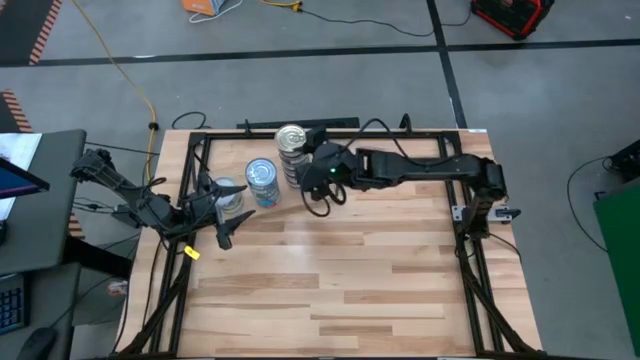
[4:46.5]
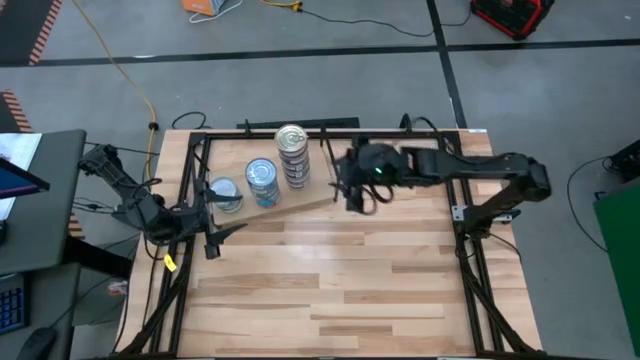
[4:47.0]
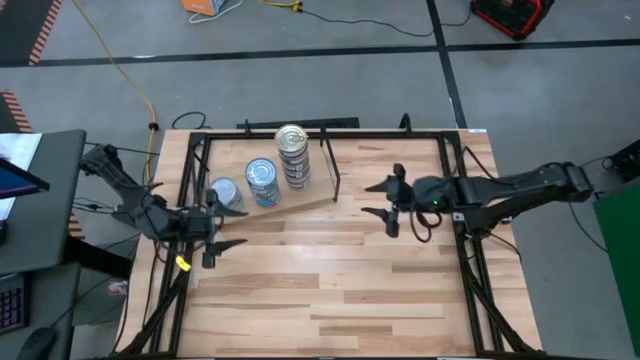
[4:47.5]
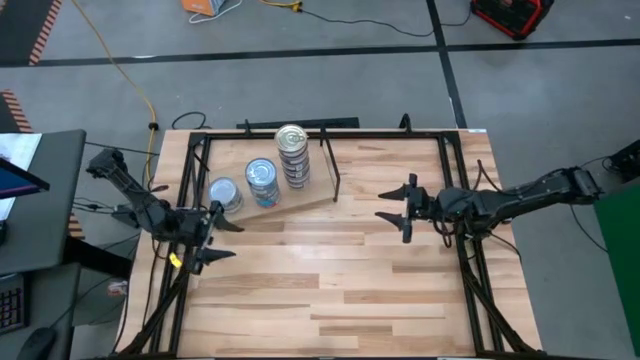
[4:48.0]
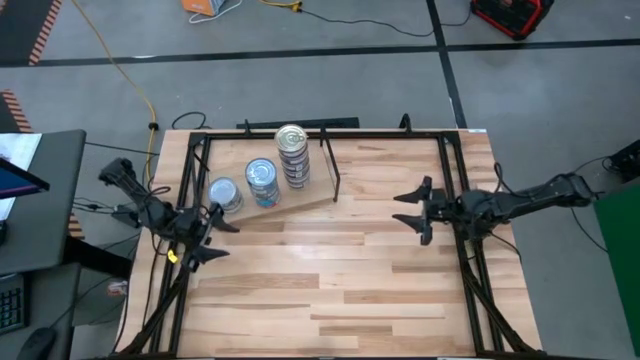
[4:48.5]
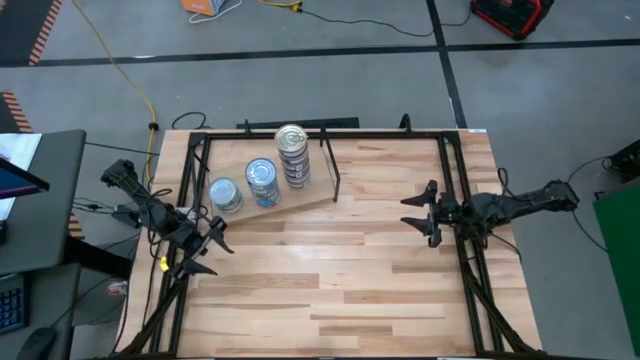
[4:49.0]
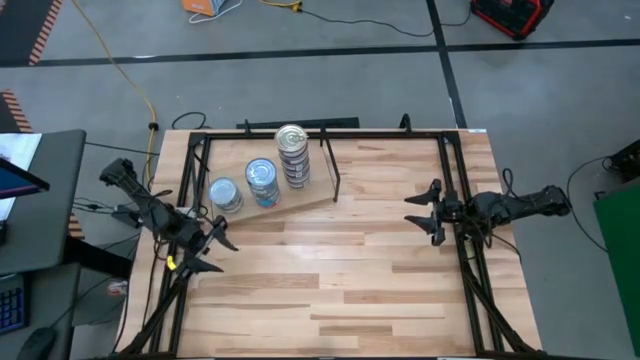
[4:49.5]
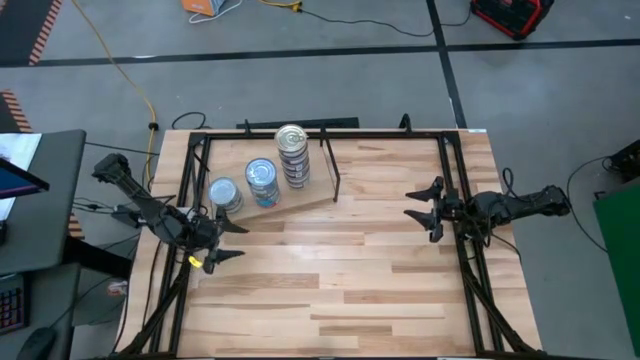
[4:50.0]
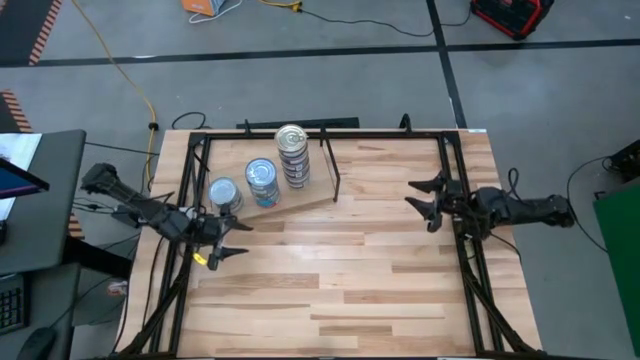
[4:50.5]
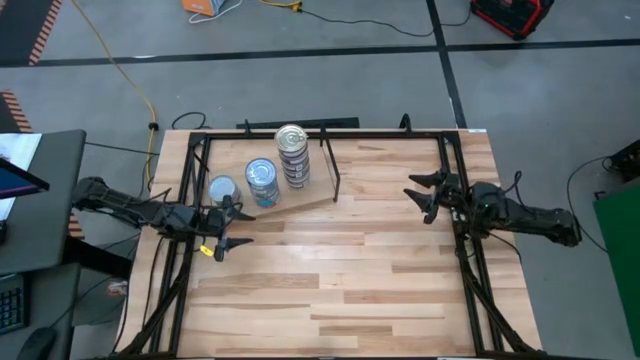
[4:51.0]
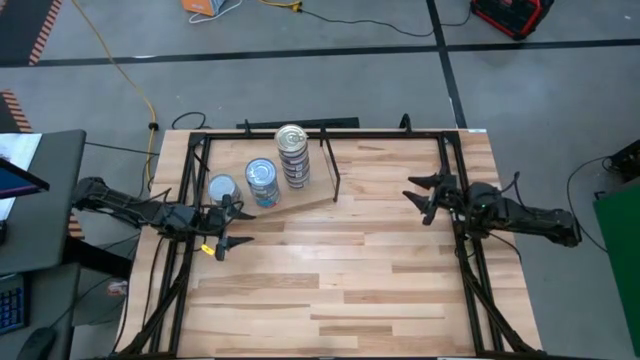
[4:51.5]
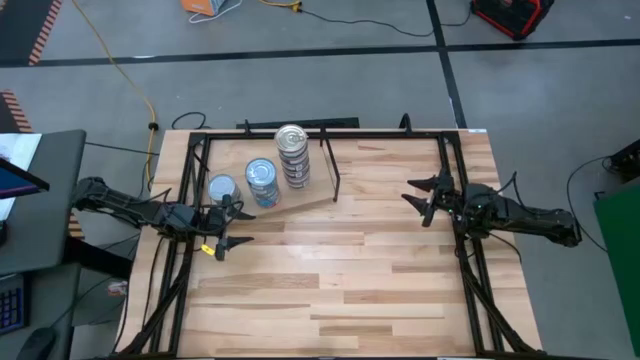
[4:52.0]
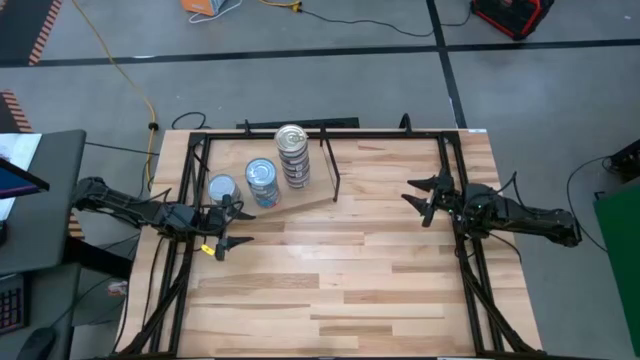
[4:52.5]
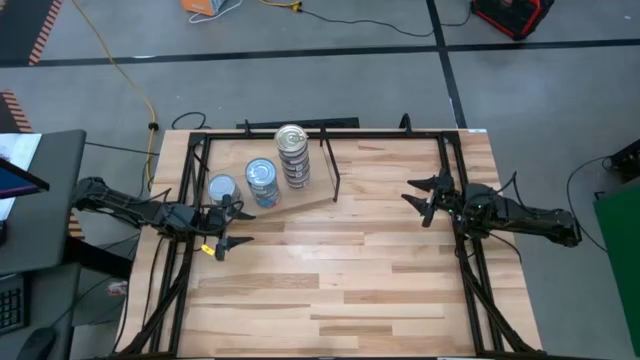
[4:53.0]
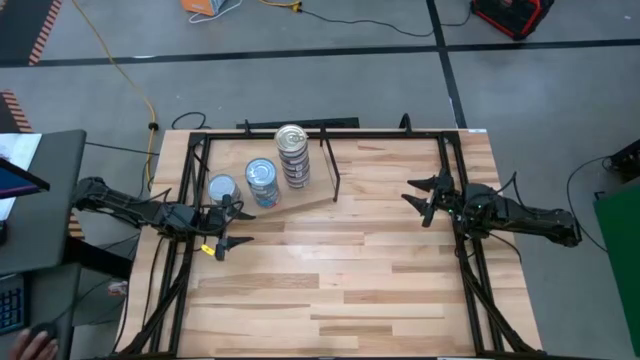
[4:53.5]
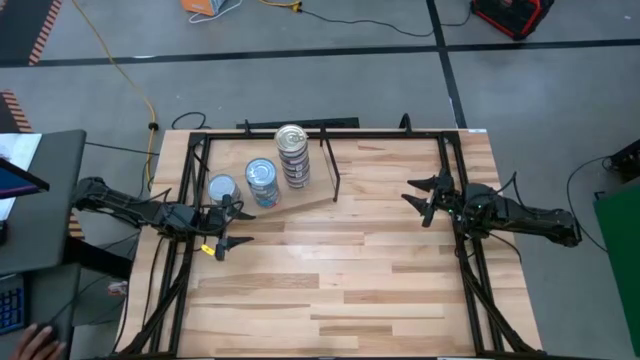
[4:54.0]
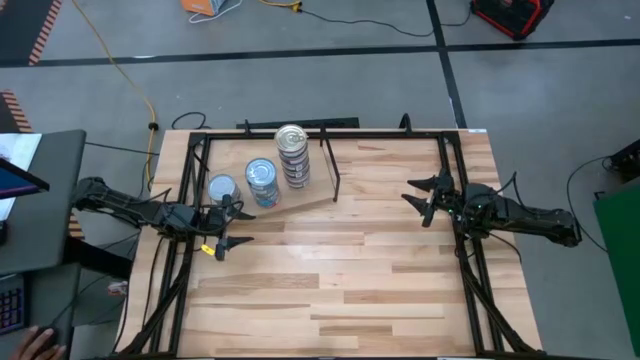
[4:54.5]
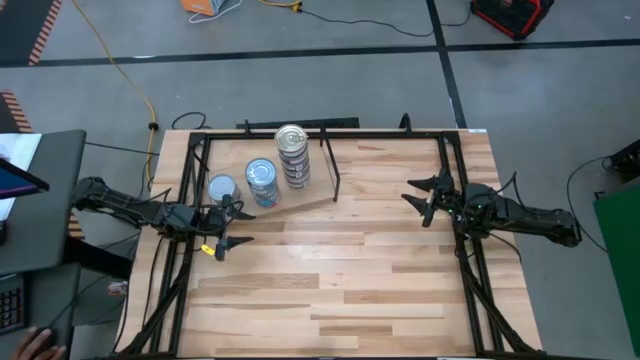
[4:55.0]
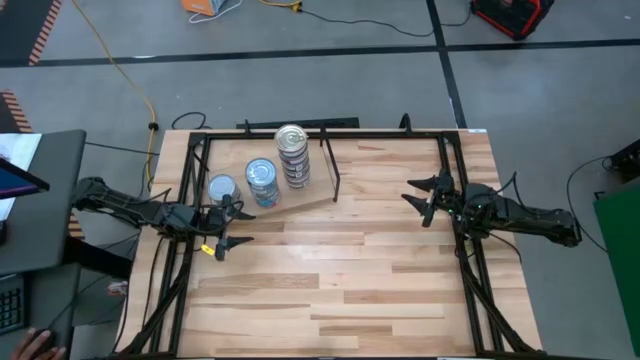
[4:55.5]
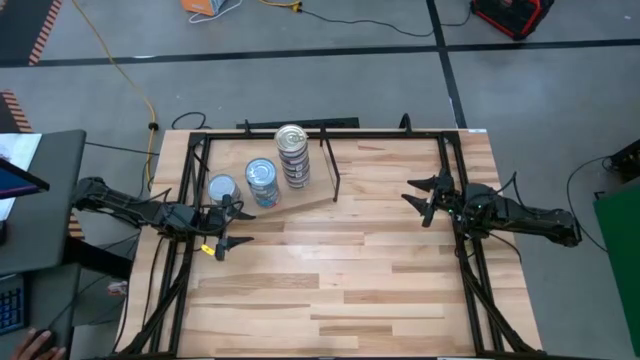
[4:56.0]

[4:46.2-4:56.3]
Task: Stack canned seafood by type on shelf
Return to Home Position

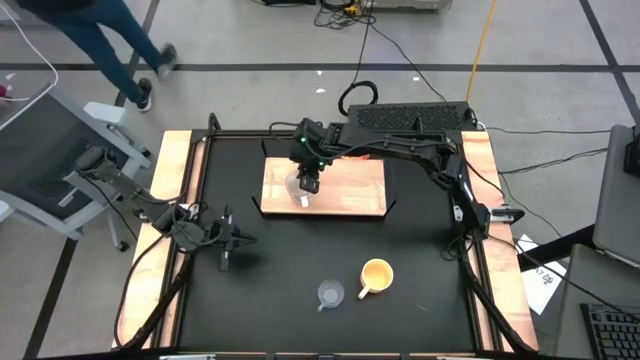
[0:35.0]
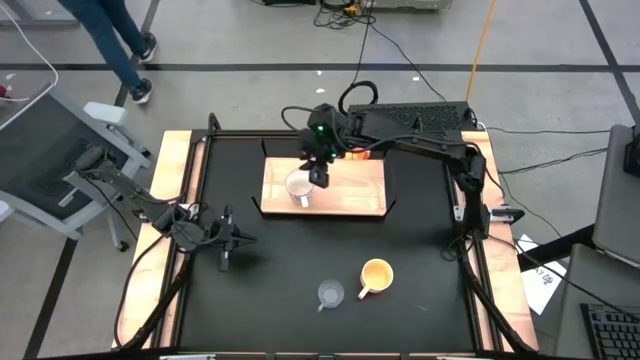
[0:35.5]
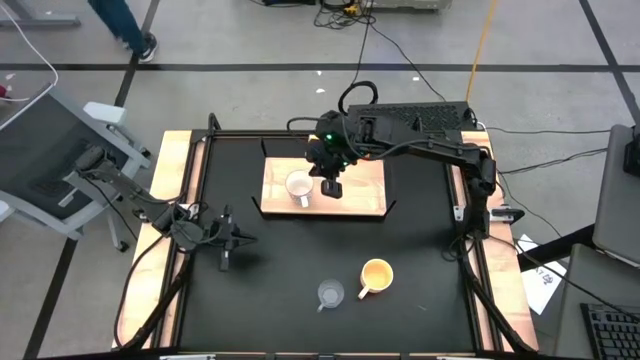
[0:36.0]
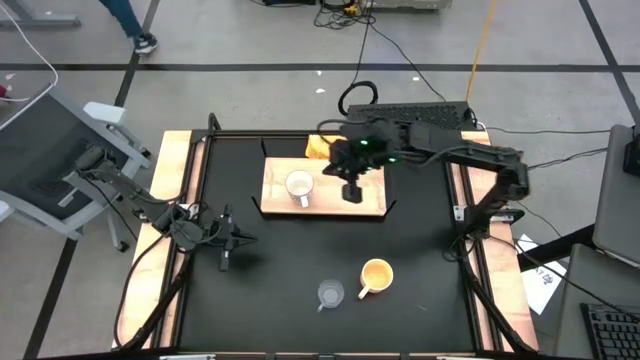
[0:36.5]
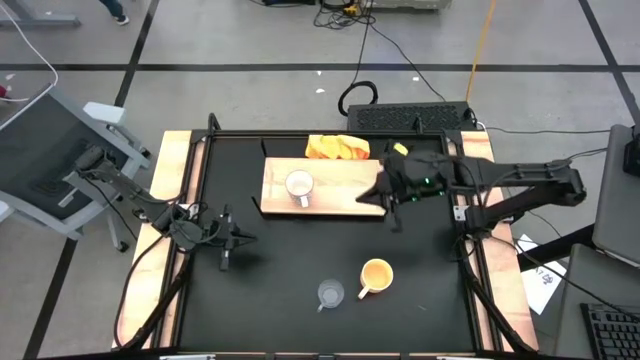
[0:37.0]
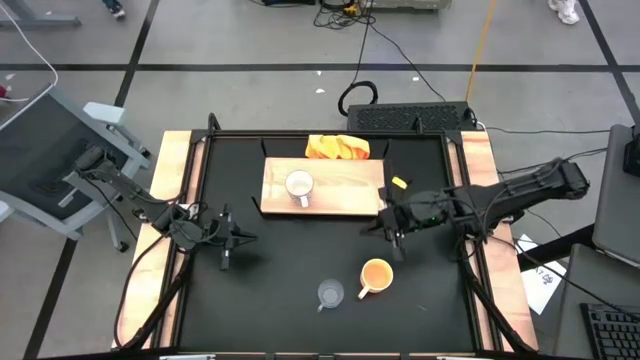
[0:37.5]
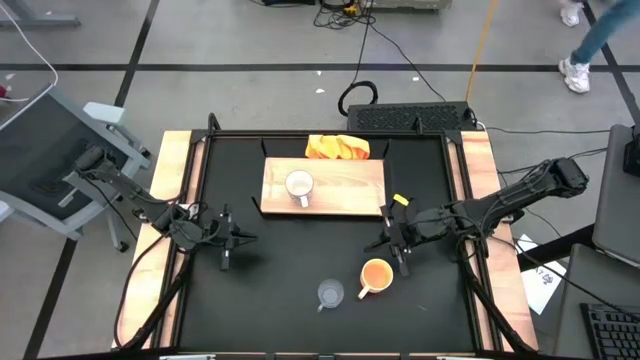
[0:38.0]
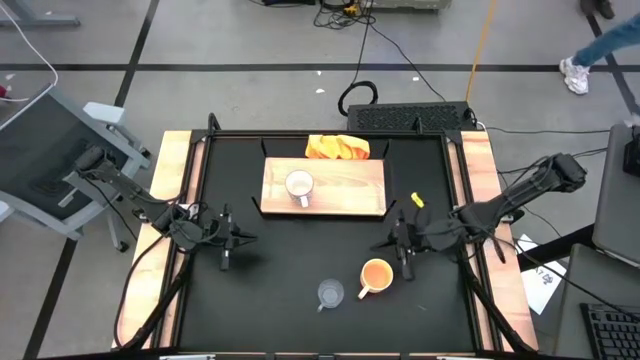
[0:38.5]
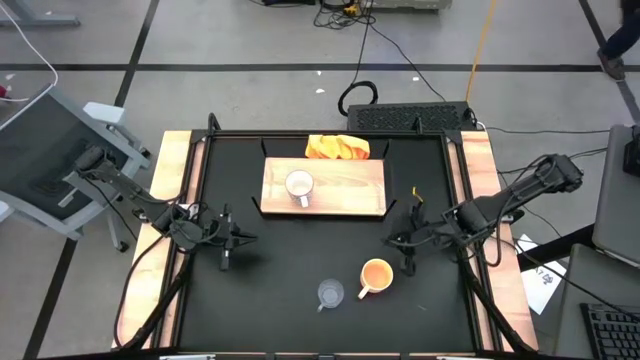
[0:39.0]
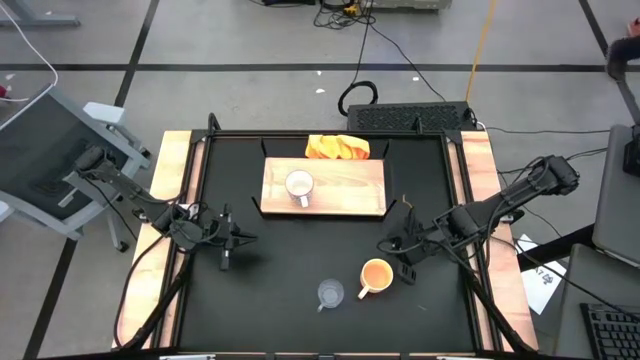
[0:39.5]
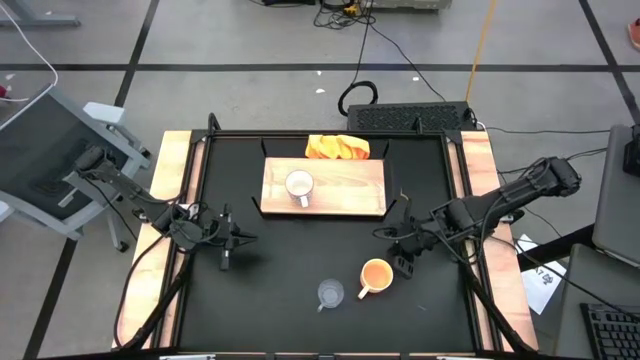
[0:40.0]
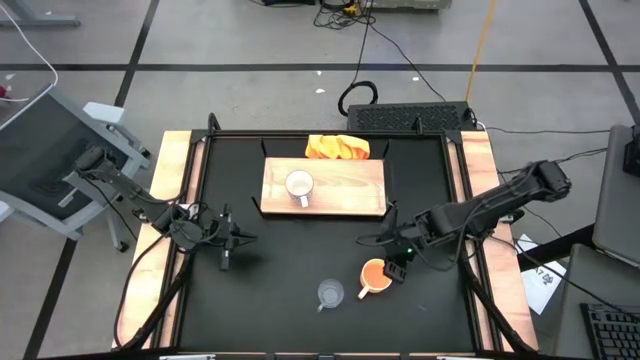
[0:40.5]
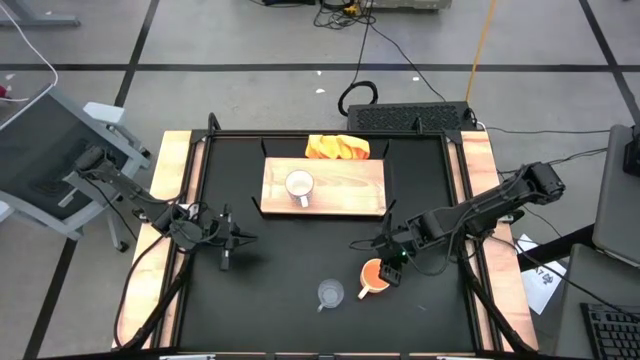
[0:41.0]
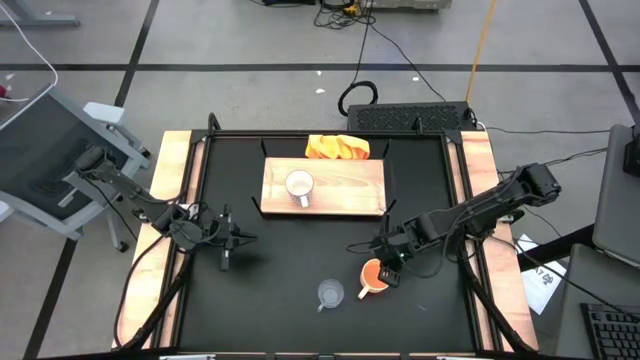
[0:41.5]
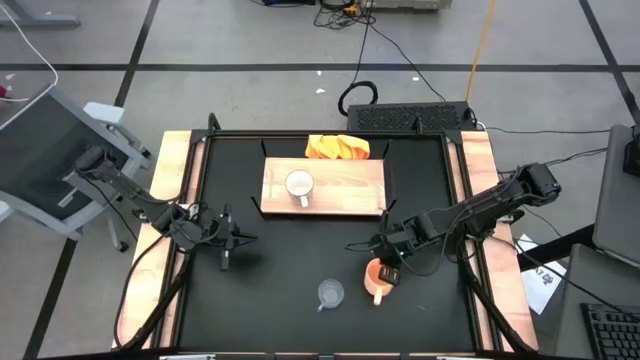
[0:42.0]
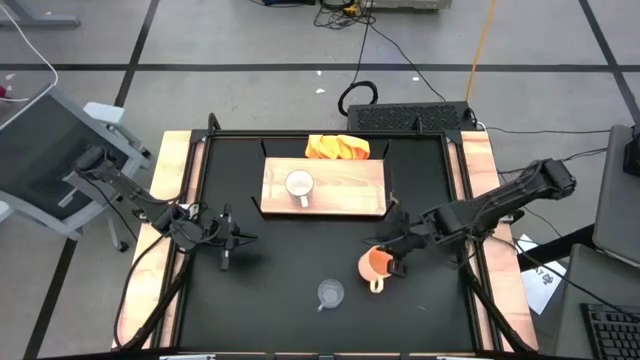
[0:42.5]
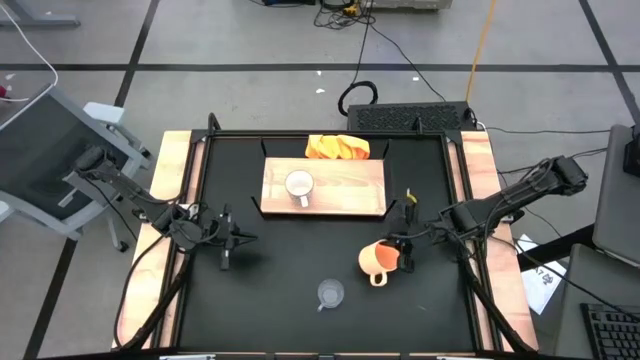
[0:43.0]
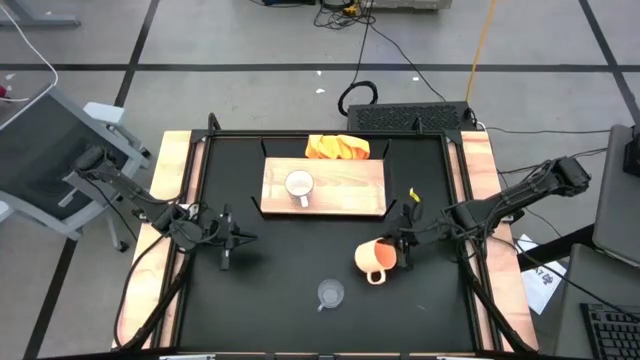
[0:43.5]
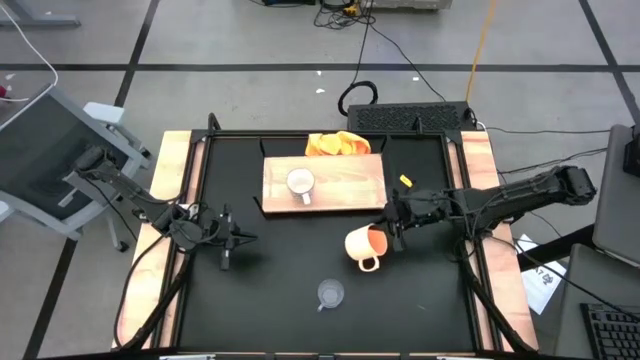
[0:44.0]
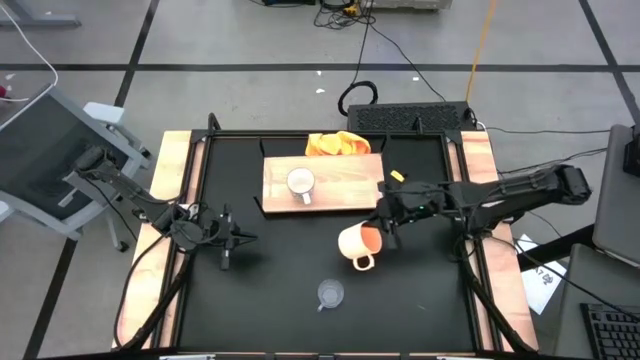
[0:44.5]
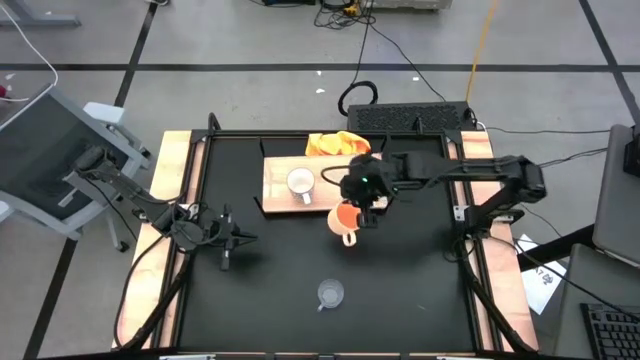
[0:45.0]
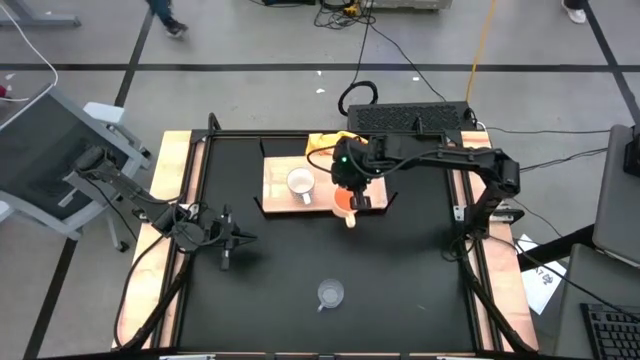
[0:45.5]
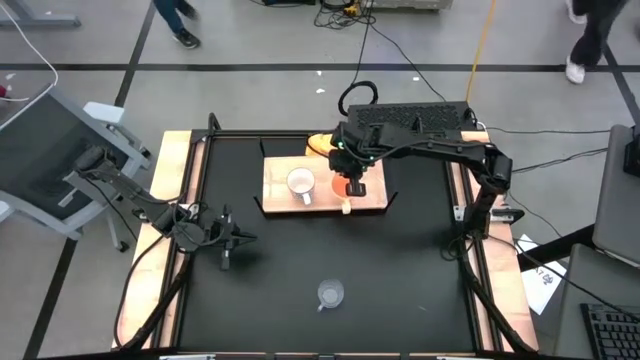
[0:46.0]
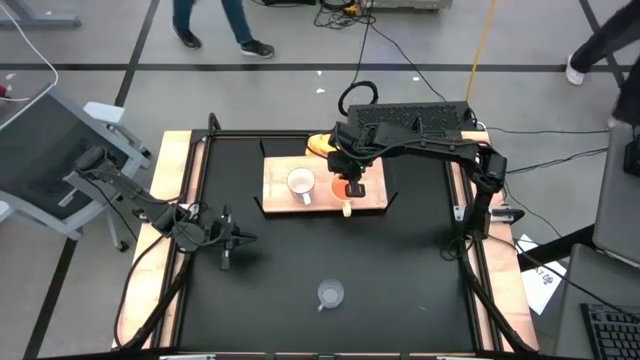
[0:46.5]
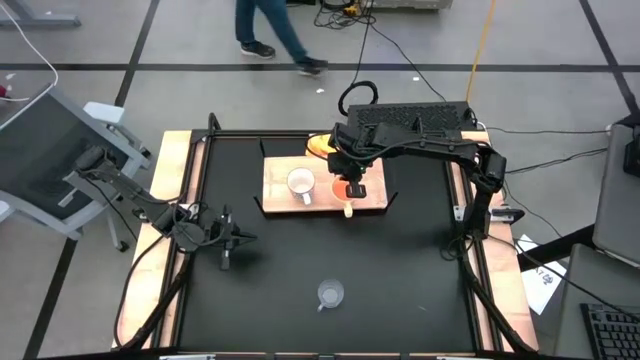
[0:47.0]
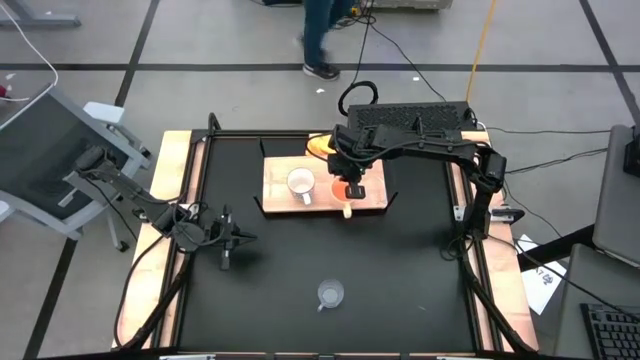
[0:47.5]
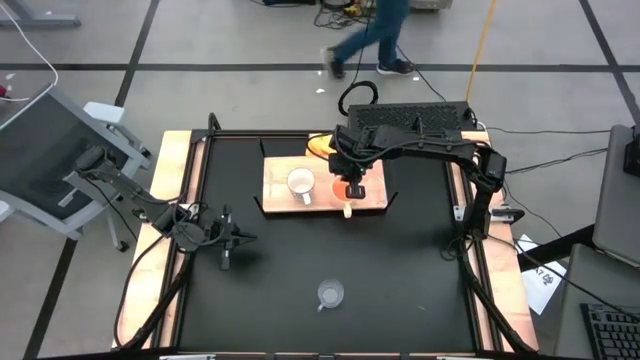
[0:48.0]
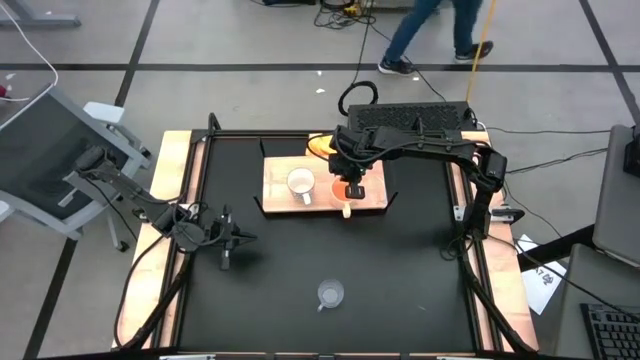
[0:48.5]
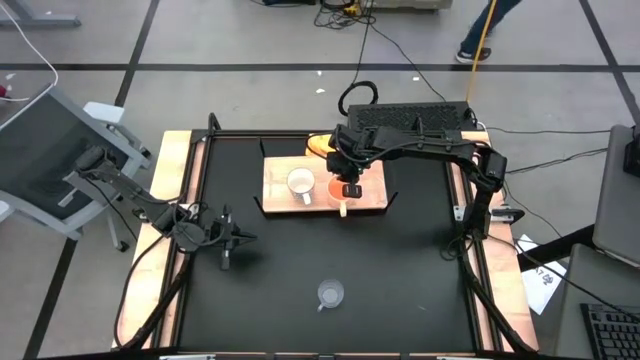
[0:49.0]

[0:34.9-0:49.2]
Task: Stack small to large cups/mugs on shelf
Put the orange cup on the shelf
